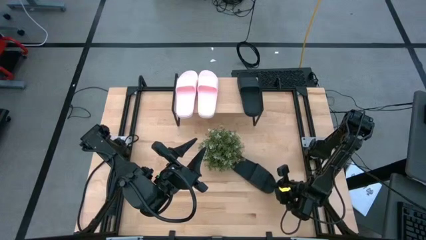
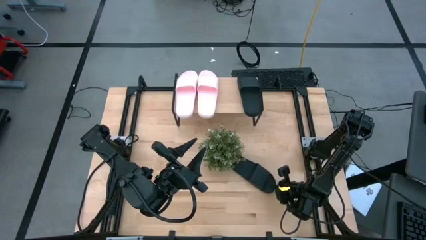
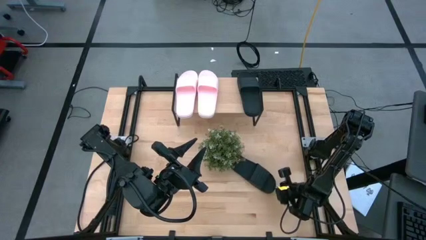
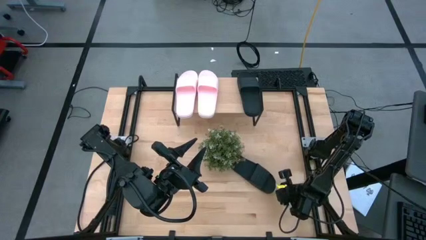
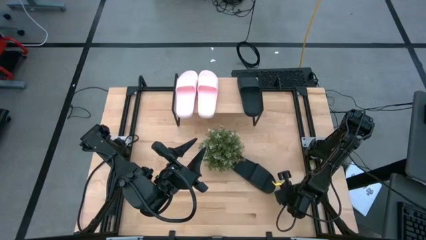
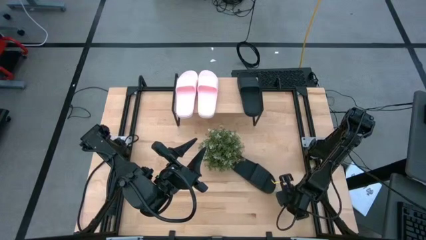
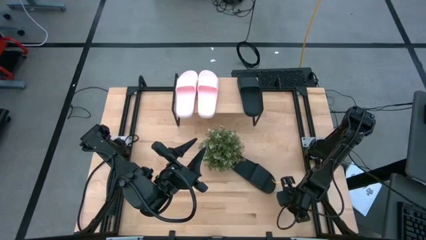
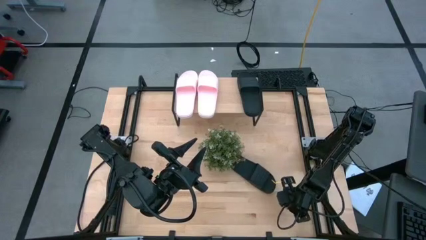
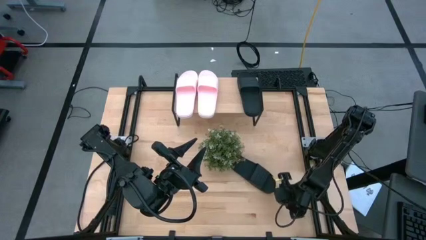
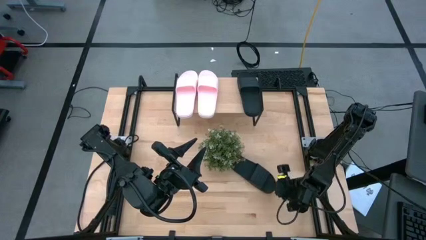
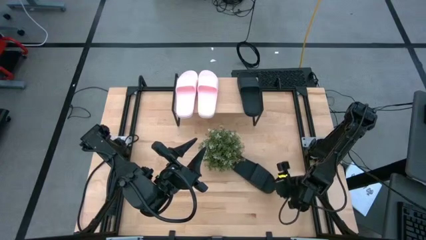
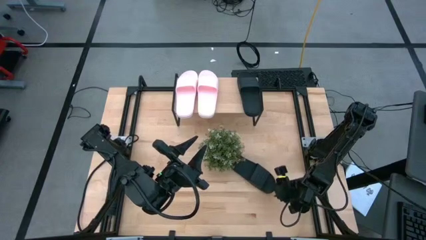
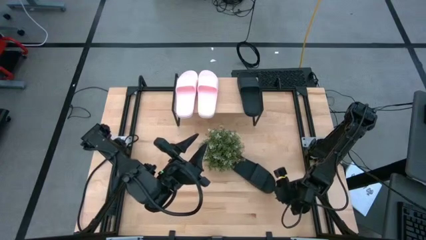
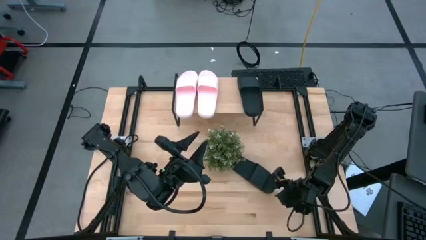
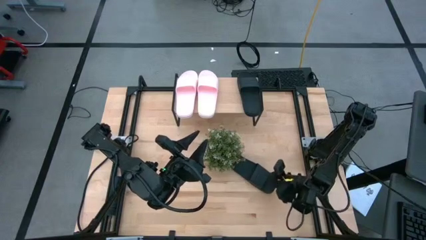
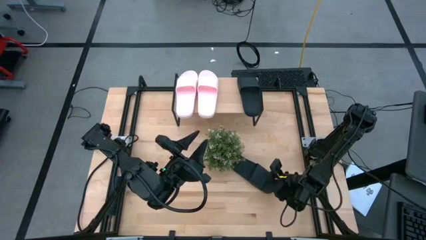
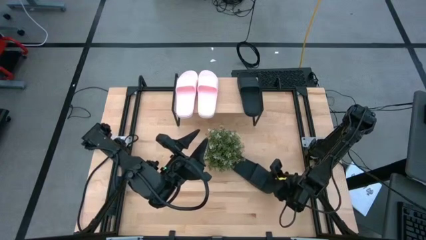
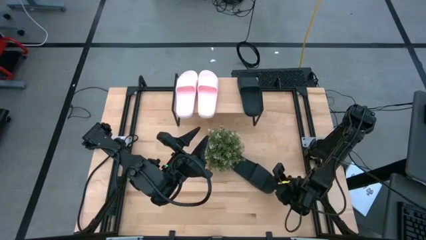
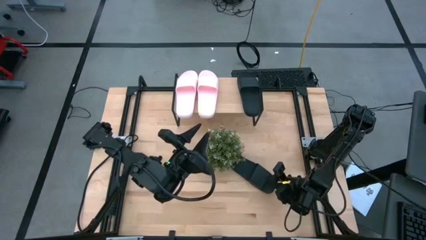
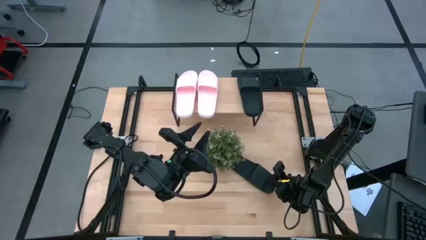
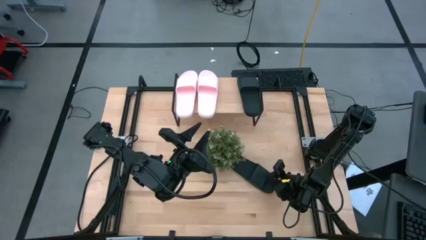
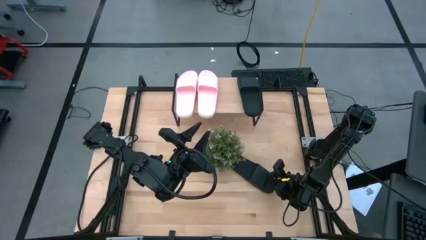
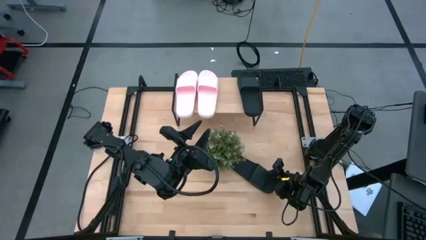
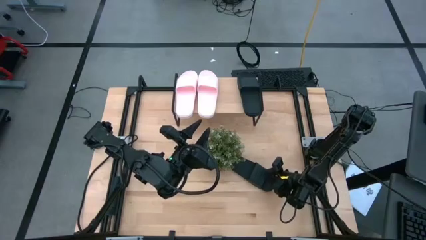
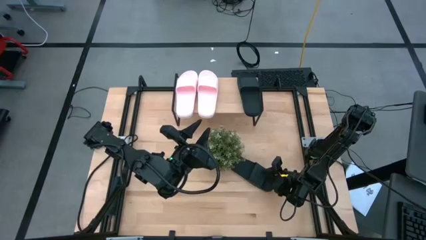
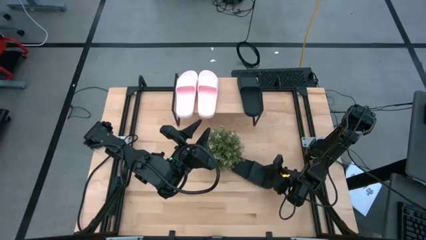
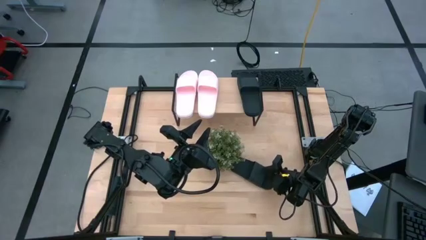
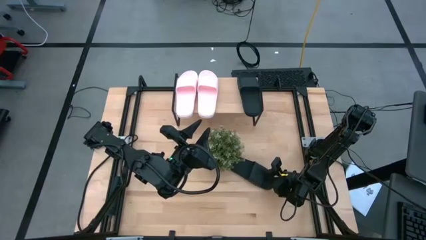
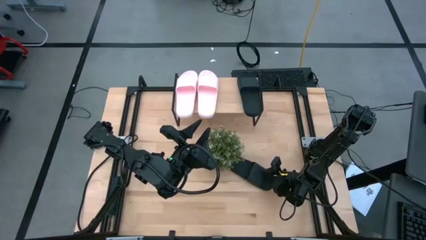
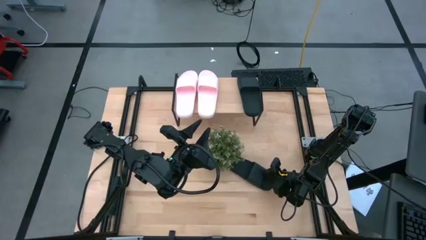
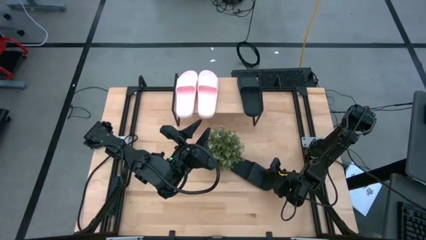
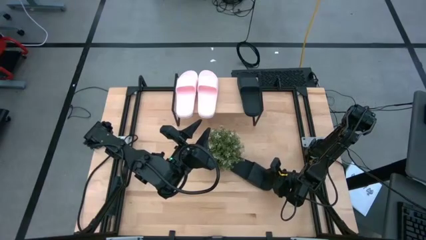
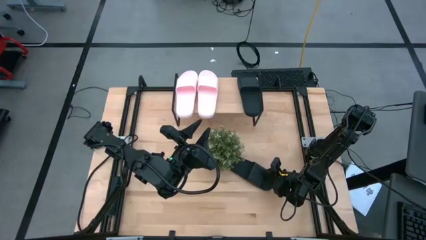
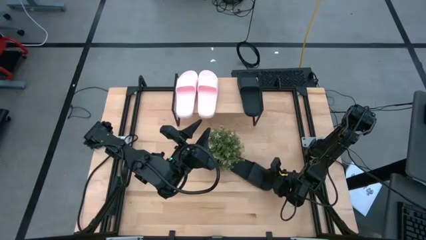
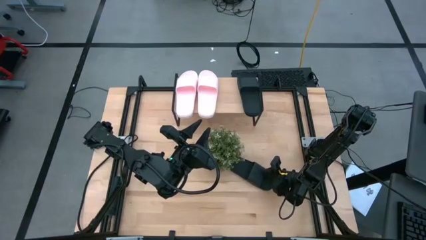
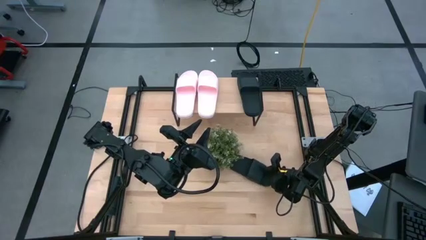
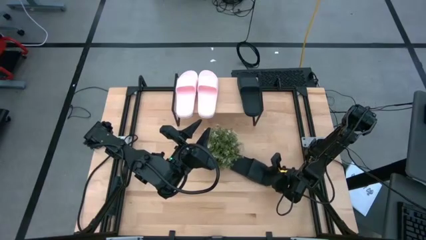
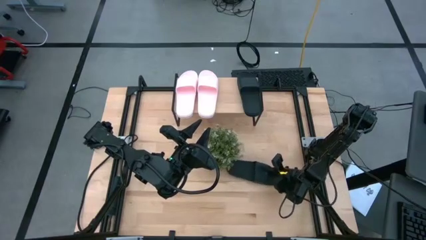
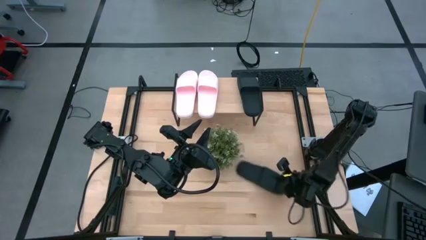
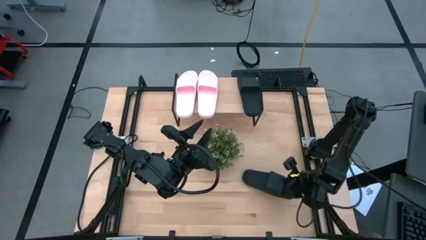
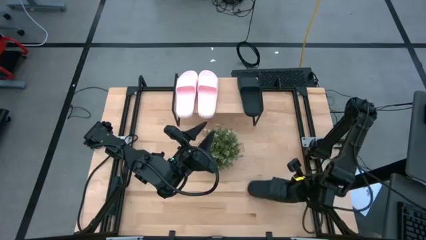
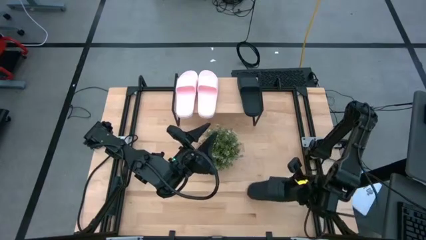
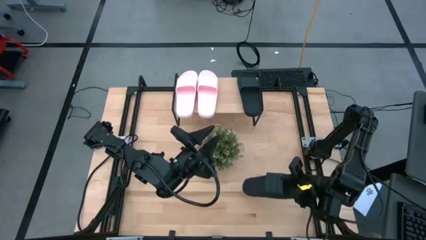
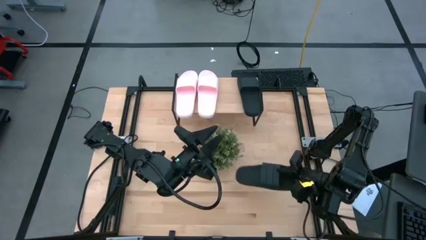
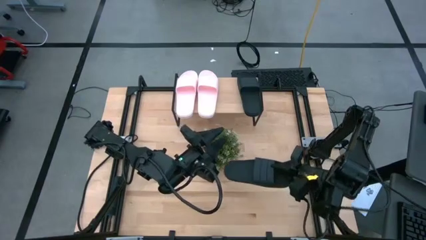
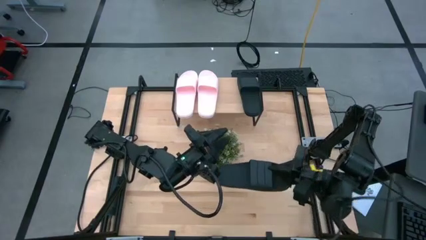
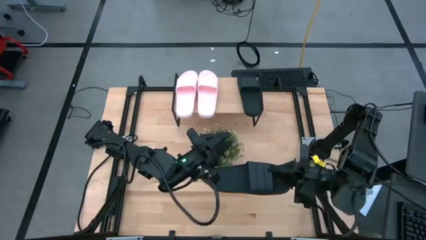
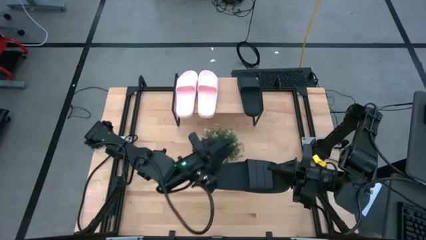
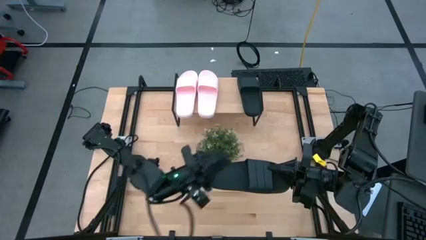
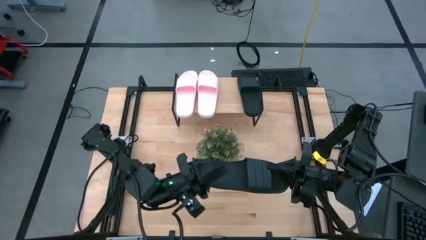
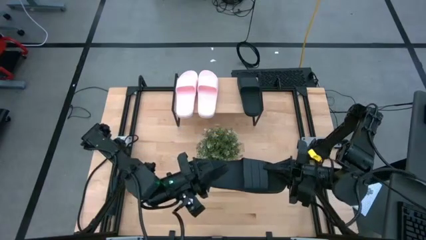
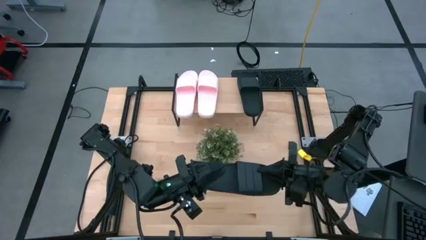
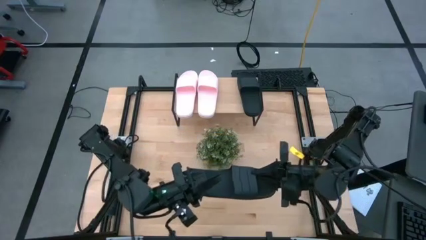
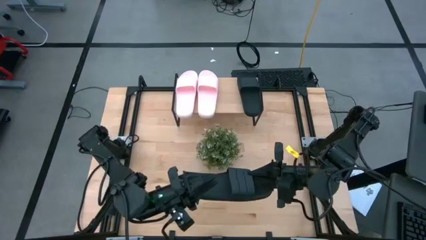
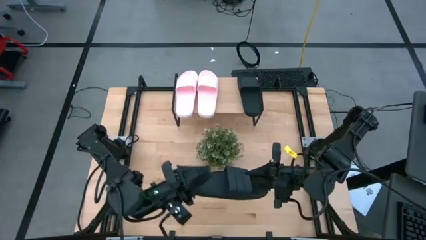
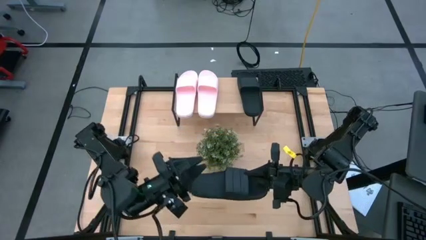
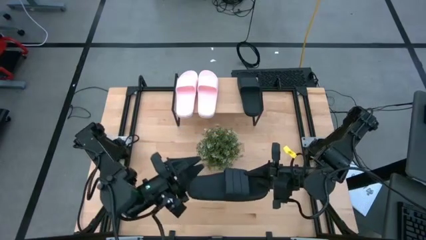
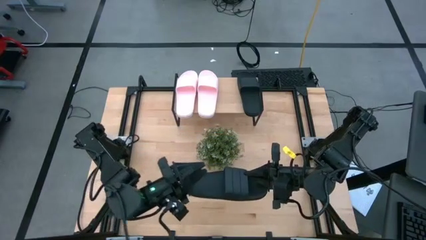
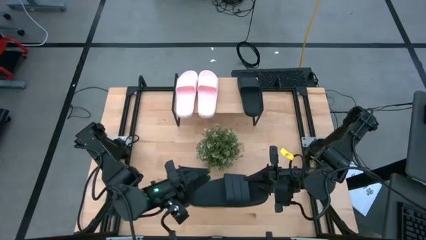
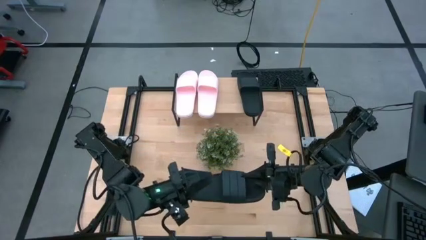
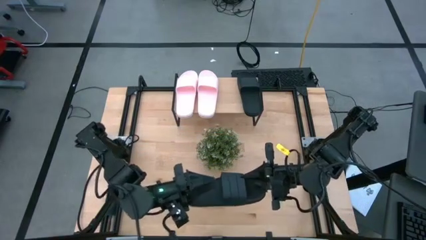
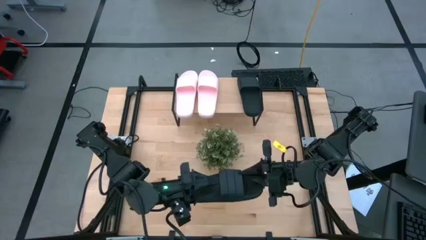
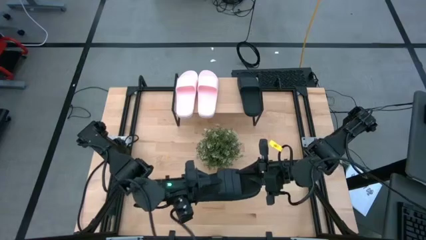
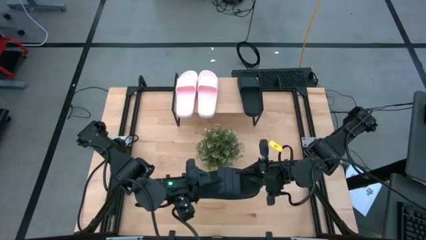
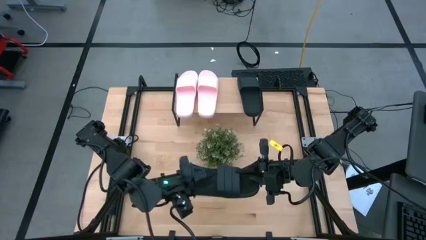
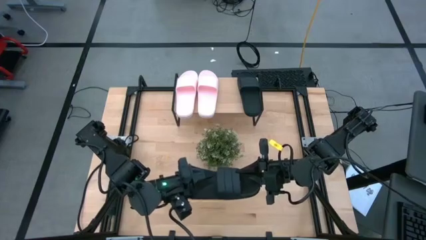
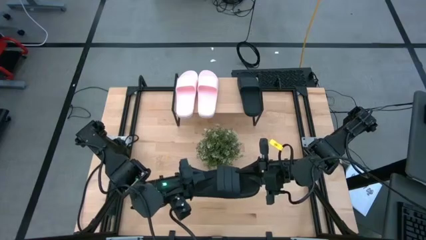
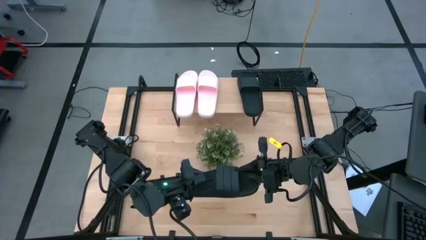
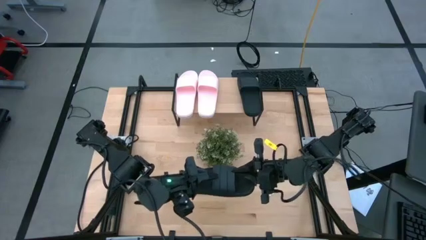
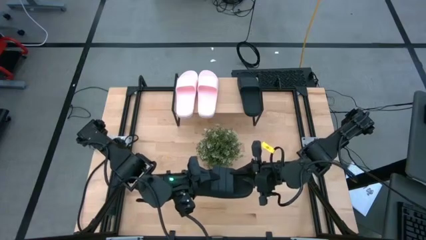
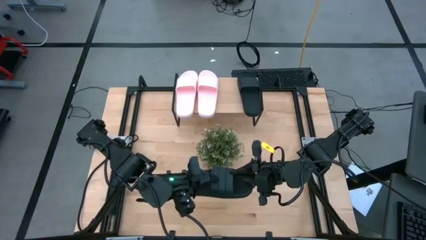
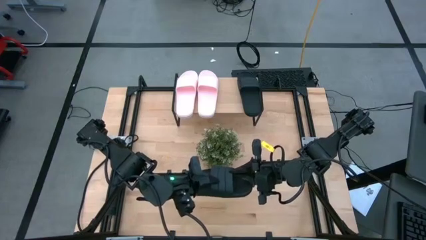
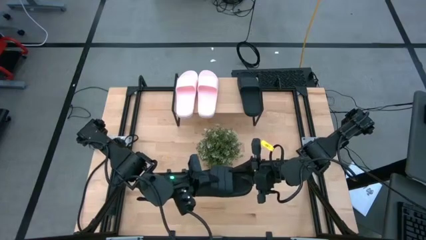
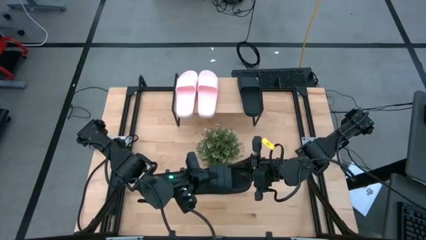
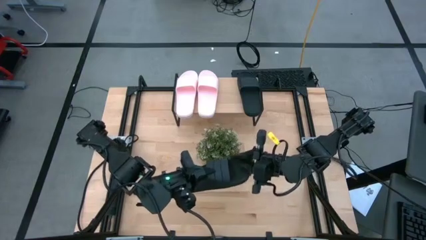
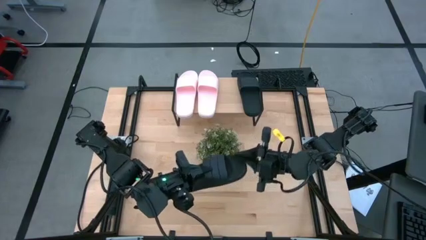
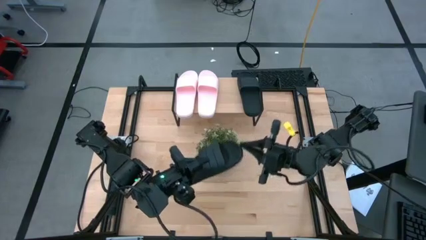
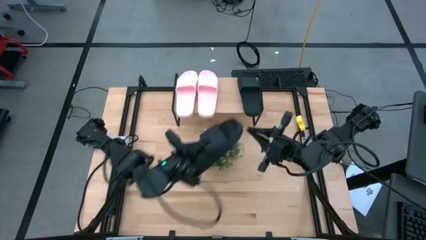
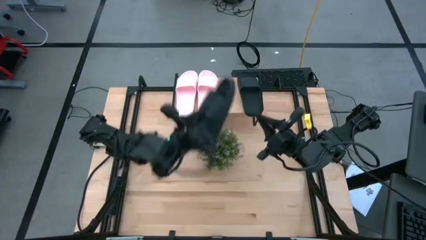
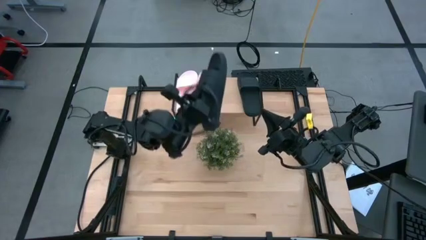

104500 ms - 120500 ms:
Task: Pick and place slides into the shelf
Put the black slipper on the shelf
